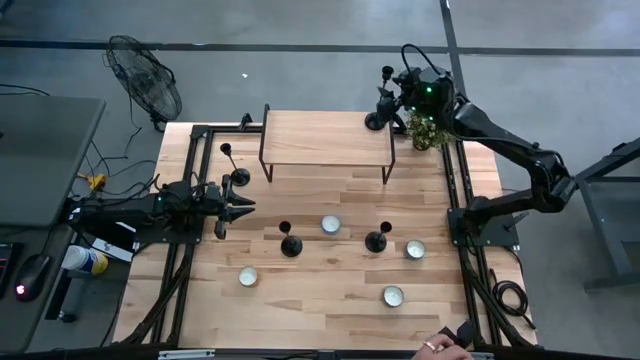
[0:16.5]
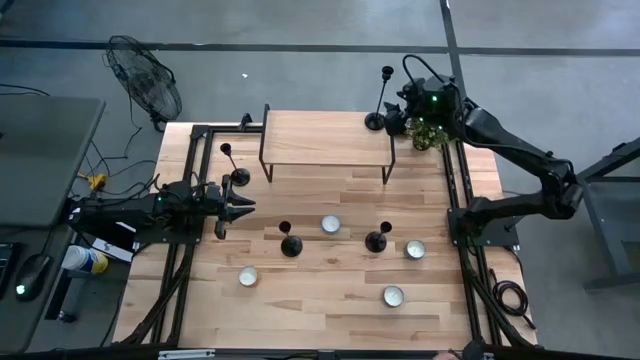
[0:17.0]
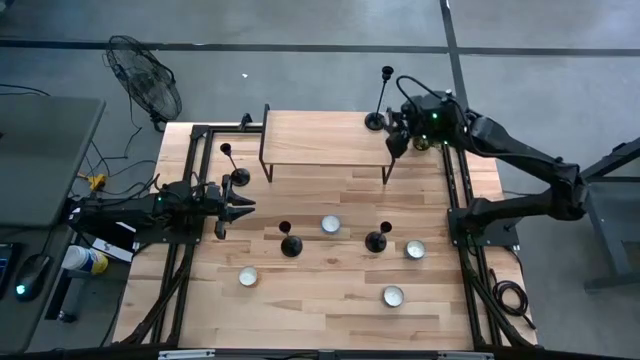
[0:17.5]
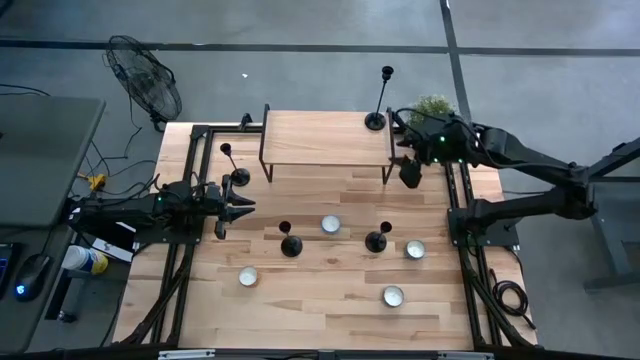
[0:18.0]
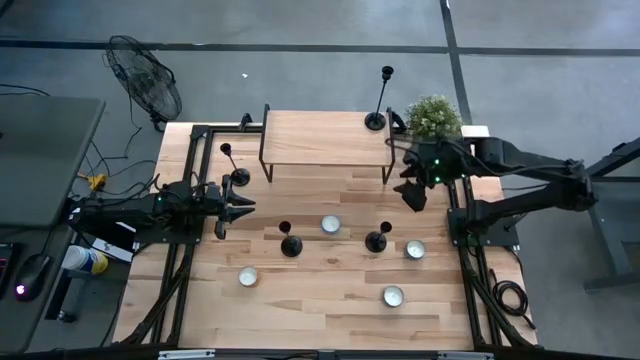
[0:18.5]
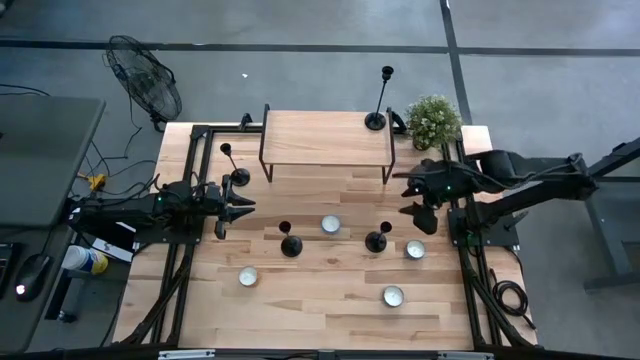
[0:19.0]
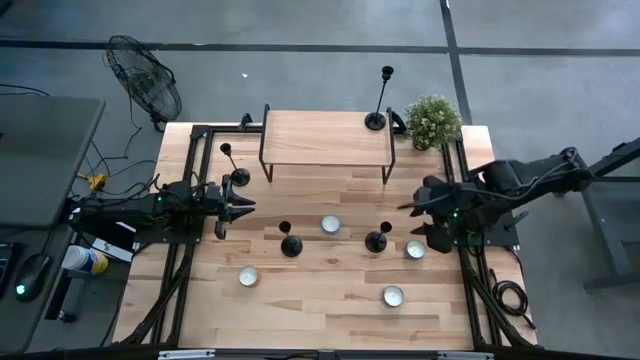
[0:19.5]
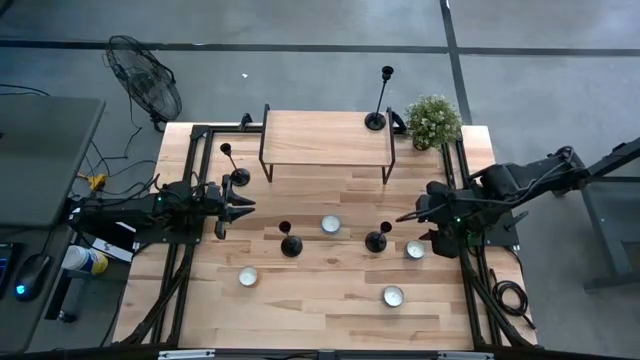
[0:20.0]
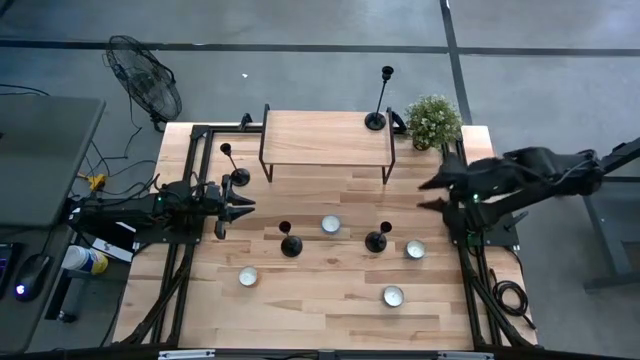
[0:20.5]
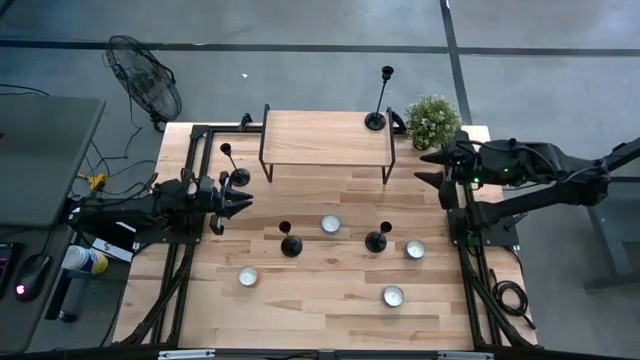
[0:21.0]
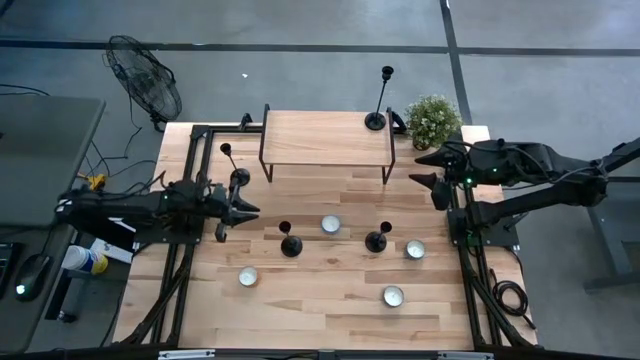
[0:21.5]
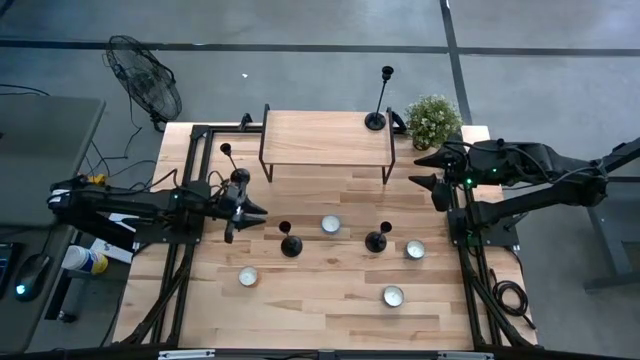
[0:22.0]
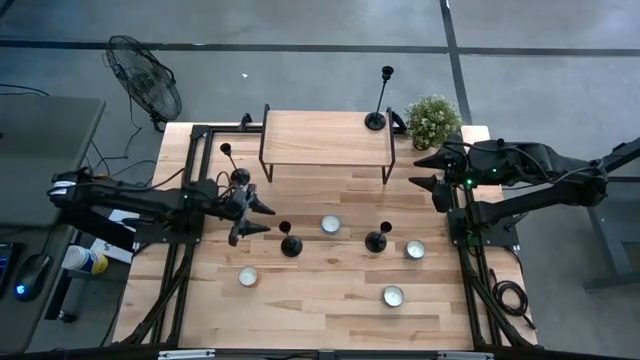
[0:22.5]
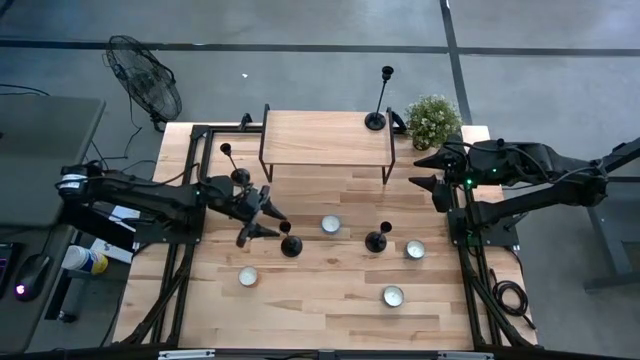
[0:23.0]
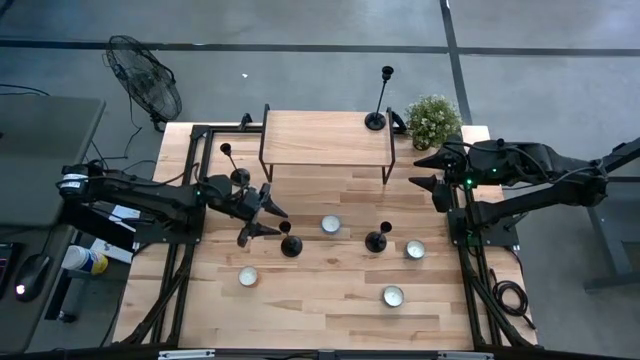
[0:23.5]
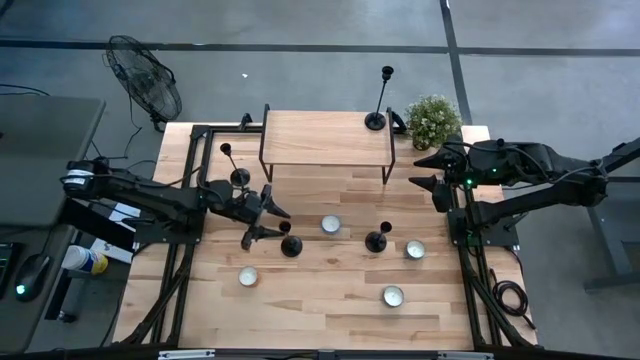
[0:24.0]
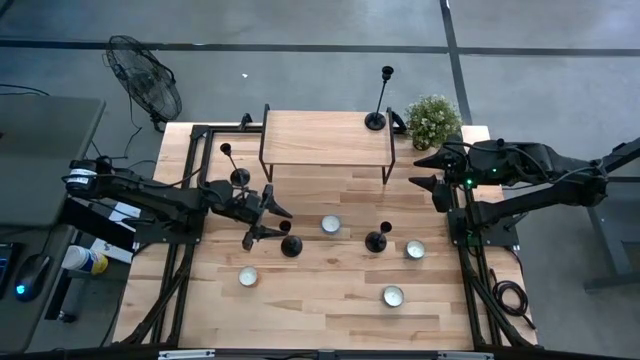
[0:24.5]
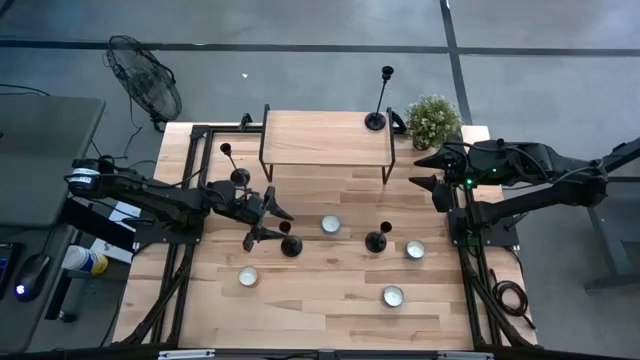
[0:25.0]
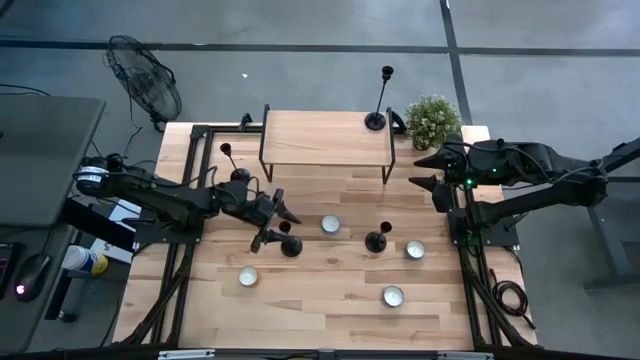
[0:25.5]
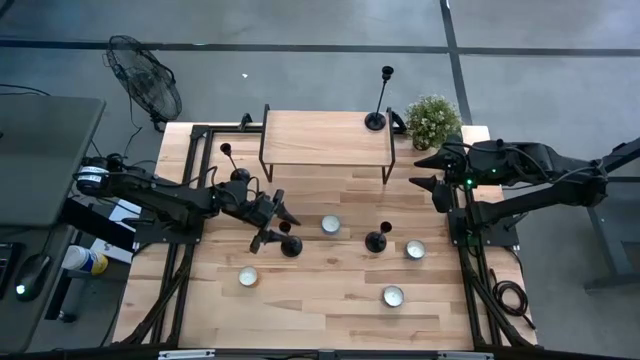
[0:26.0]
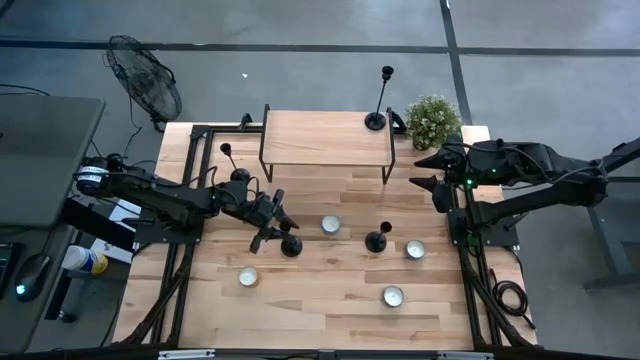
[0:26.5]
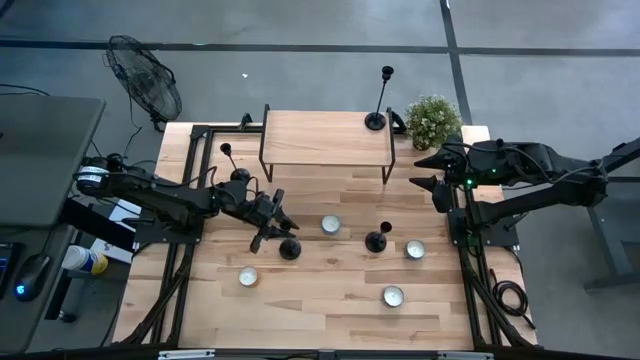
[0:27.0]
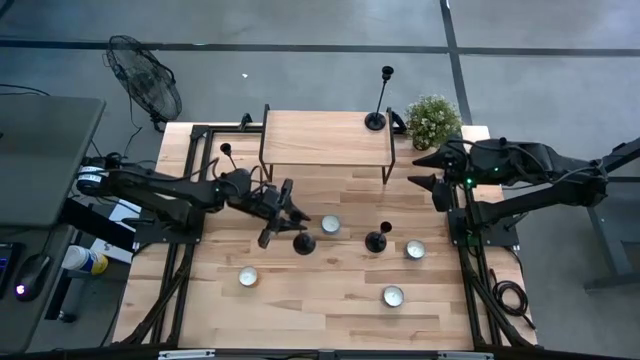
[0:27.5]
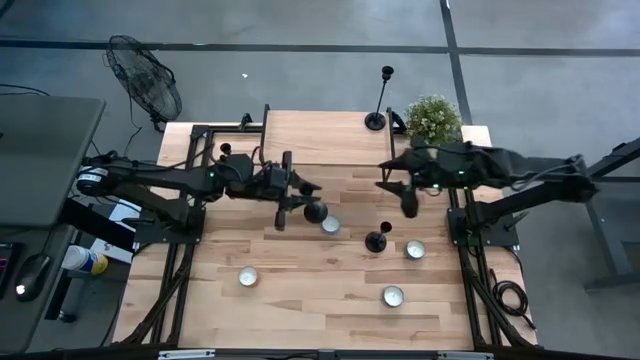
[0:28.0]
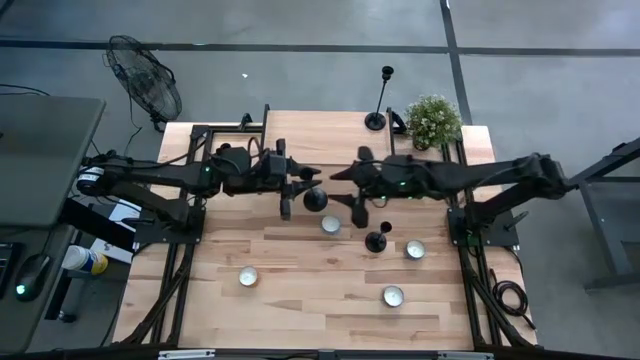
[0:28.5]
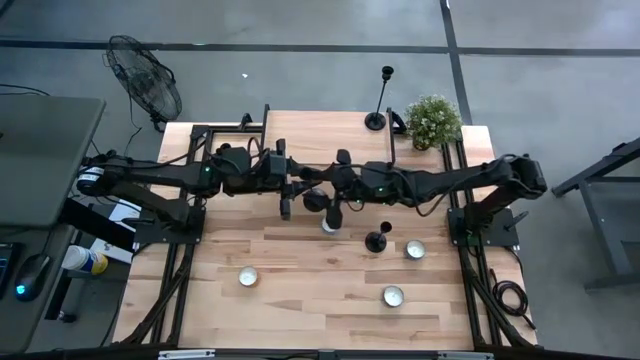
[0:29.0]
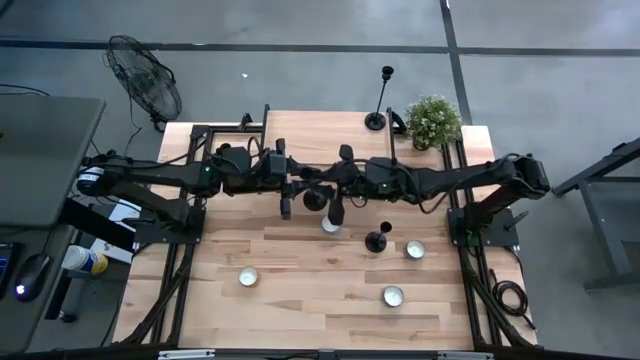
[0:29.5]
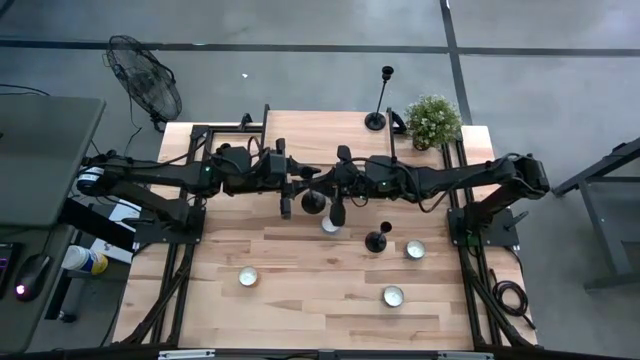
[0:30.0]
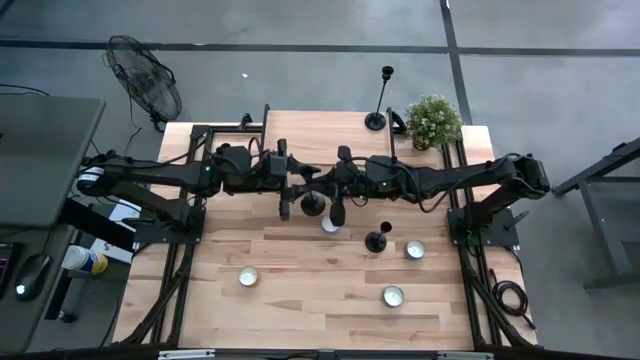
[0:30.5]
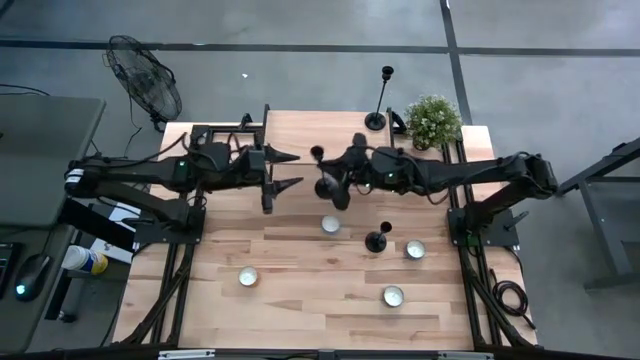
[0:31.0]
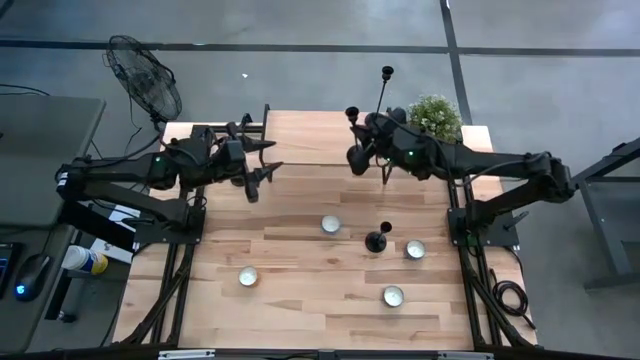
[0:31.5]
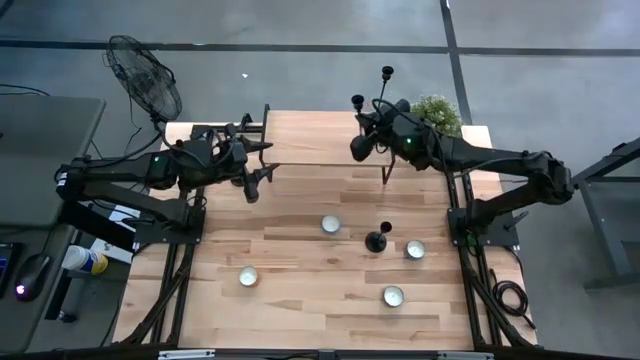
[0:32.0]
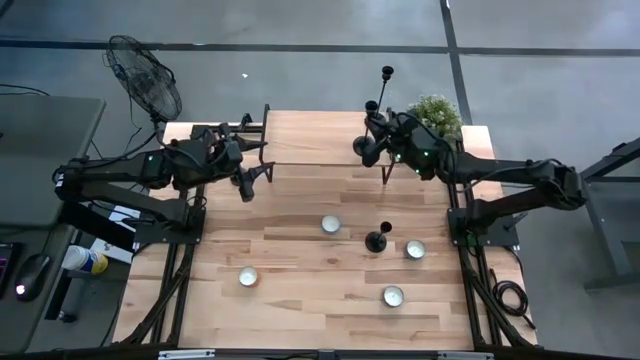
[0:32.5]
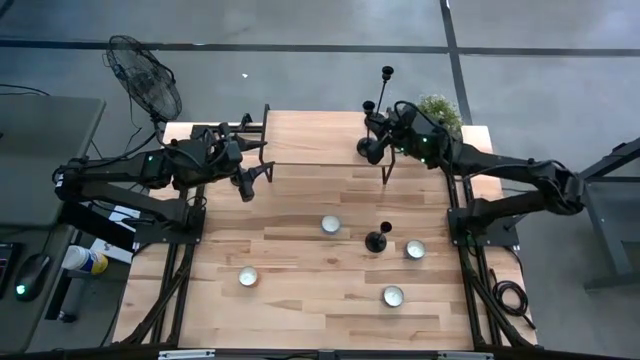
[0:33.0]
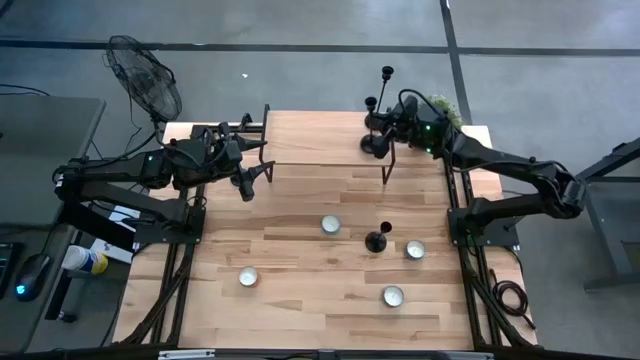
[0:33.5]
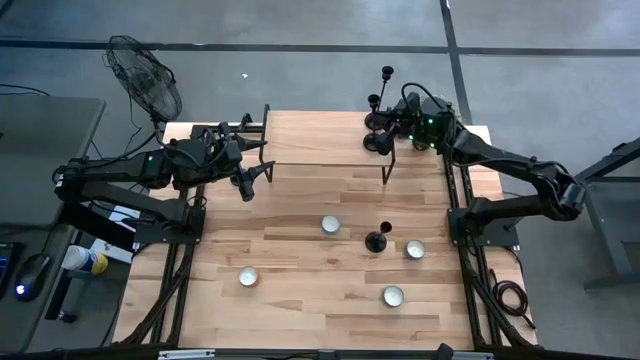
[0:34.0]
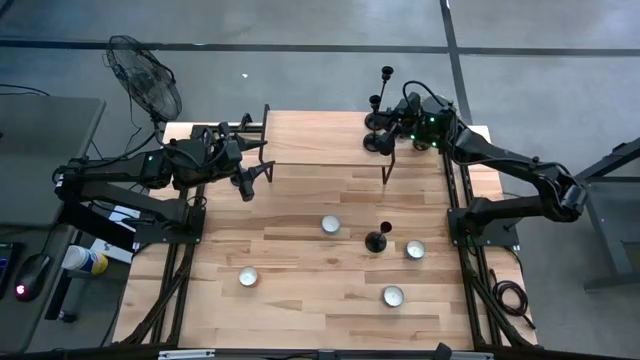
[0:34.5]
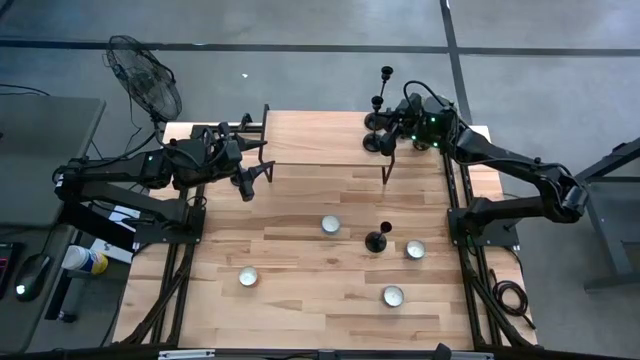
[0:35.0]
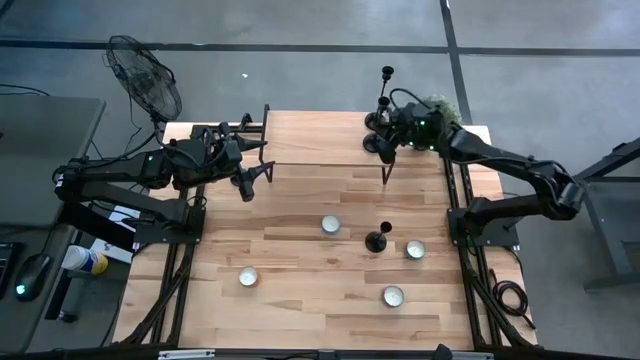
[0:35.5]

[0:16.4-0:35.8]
Task: Pick & Place candle stick holders
Put the black candle holder on the shelf

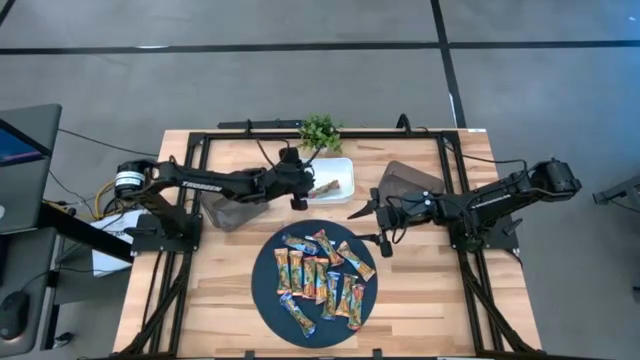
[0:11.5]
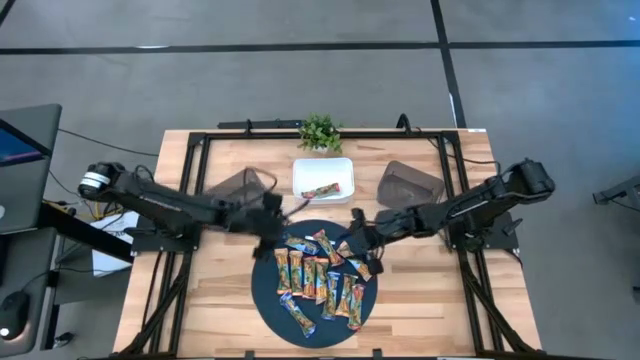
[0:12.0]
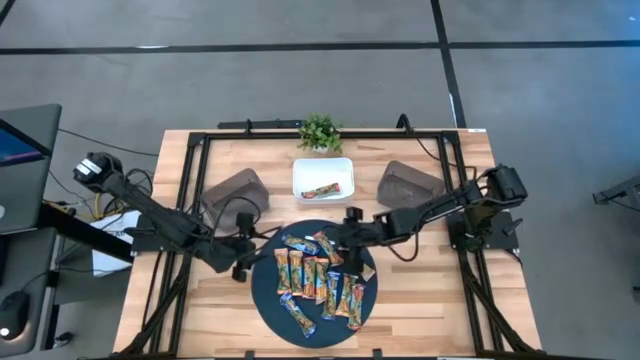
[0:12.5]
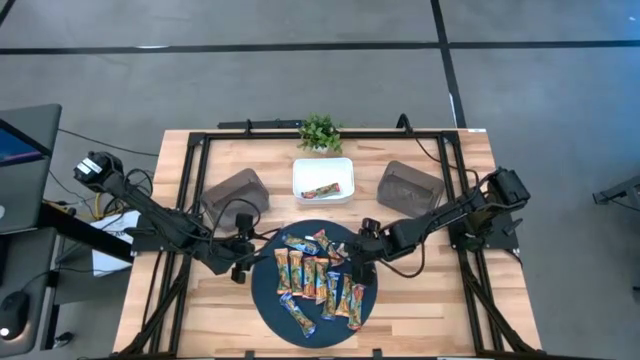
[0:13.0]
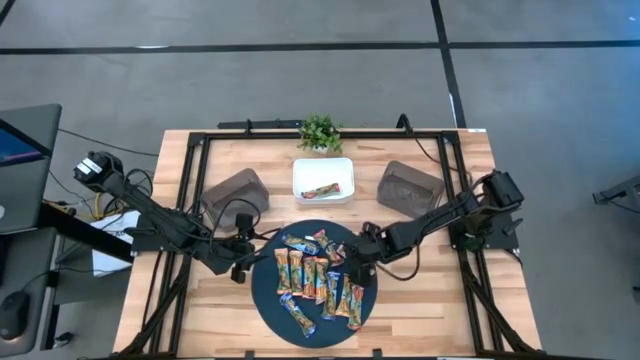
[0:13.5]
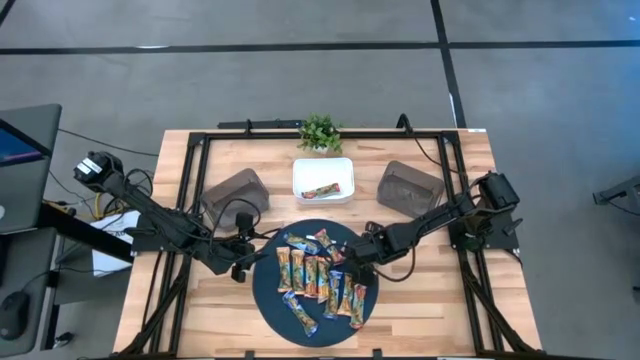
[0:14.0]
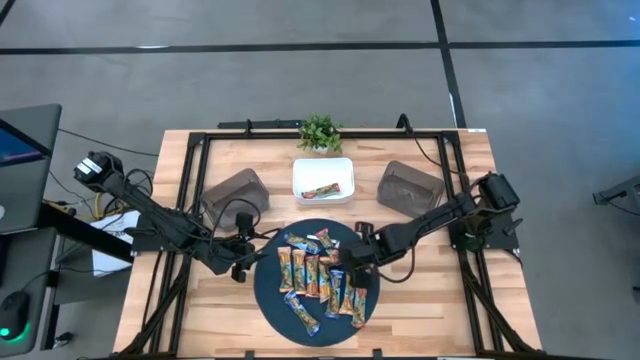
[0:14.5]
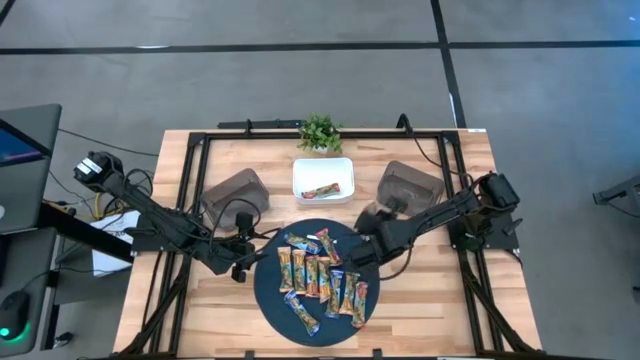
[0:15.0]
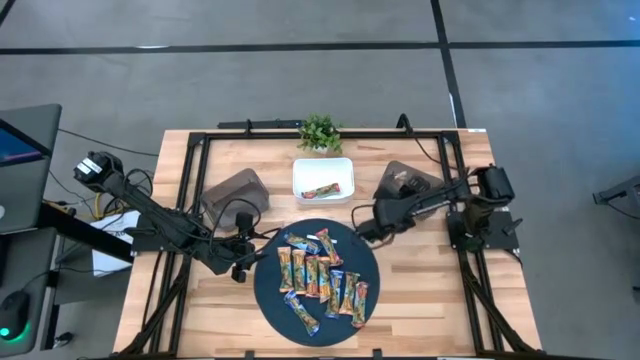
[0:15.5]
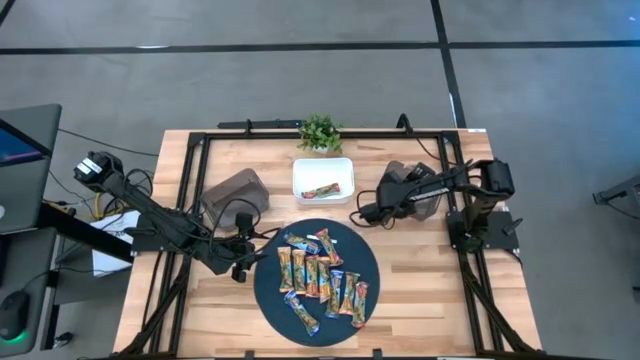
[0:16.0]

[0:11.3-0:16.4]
Task: Pick and place Granola Bars by type
Put the yellow granola bar into the right black bin
